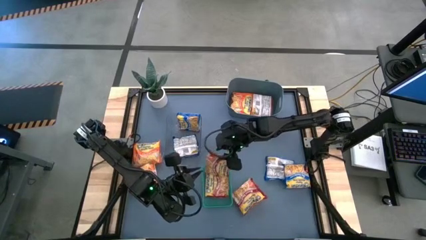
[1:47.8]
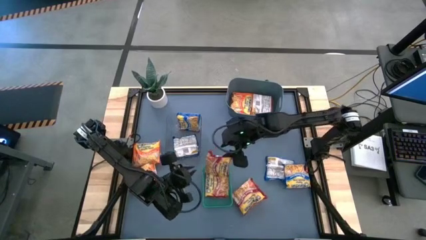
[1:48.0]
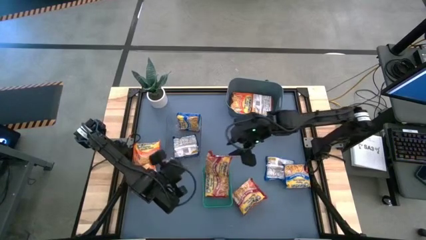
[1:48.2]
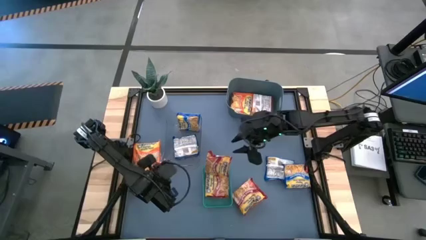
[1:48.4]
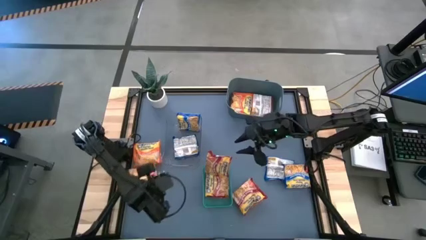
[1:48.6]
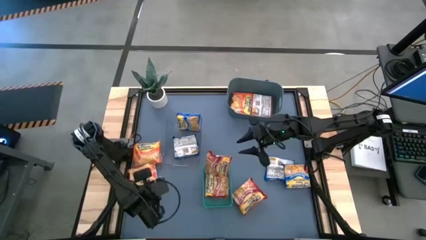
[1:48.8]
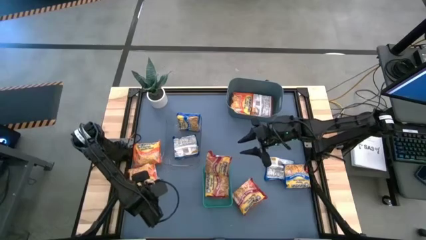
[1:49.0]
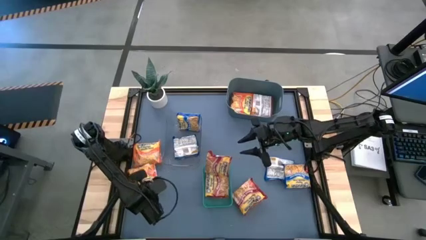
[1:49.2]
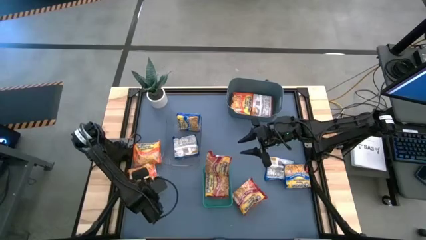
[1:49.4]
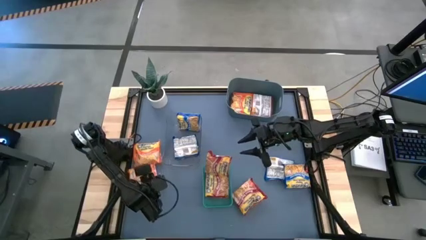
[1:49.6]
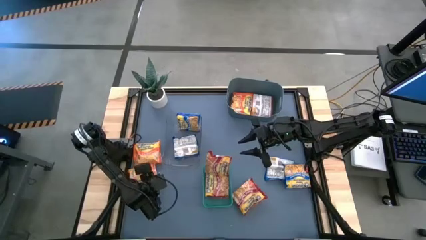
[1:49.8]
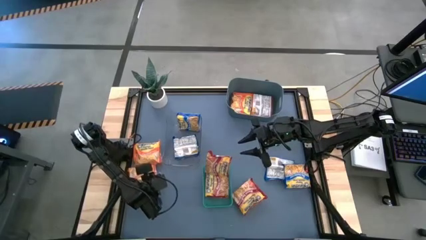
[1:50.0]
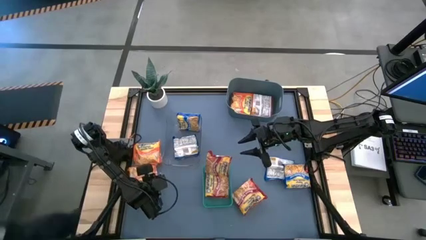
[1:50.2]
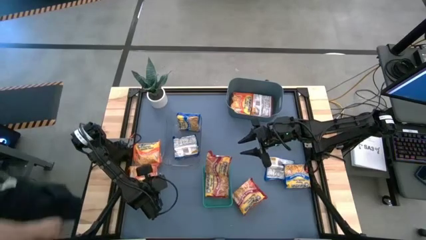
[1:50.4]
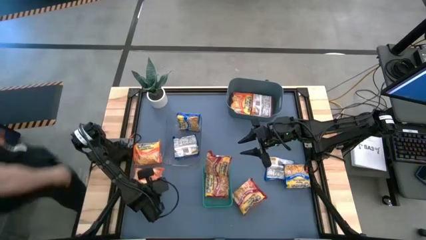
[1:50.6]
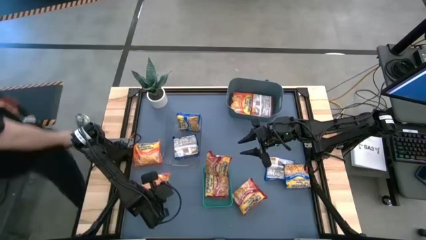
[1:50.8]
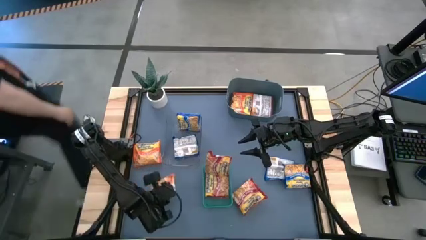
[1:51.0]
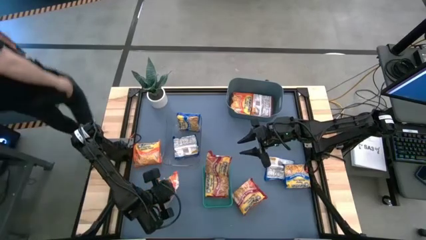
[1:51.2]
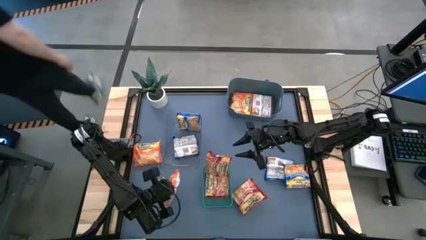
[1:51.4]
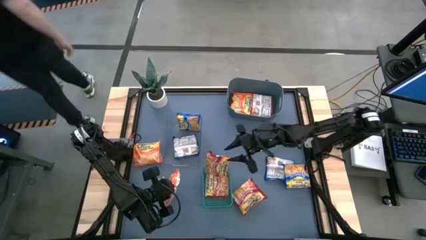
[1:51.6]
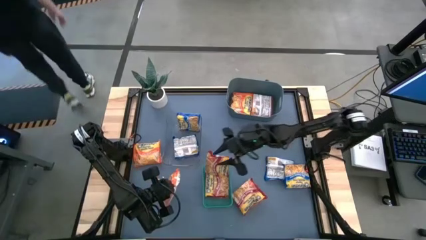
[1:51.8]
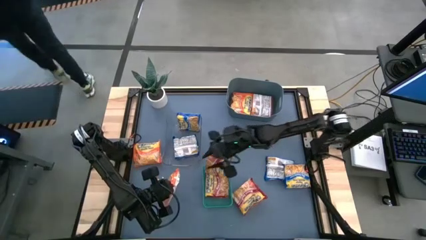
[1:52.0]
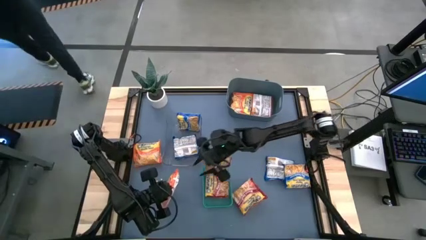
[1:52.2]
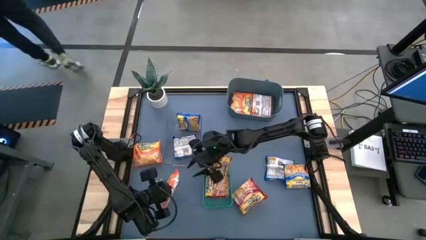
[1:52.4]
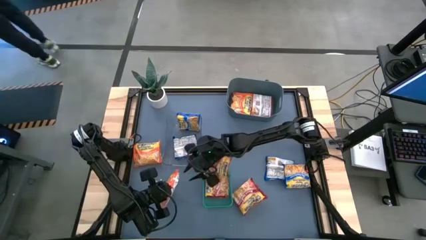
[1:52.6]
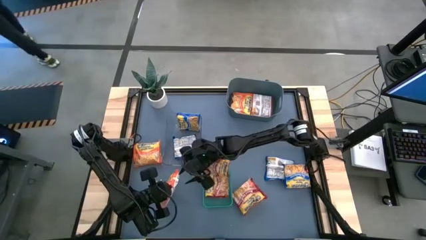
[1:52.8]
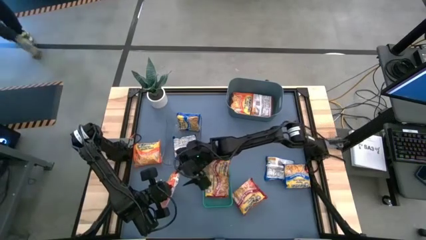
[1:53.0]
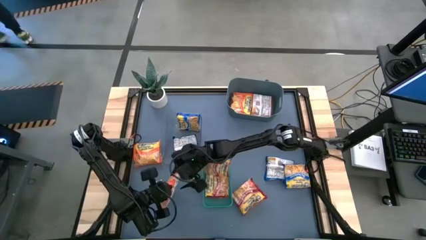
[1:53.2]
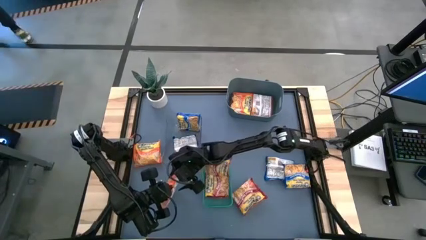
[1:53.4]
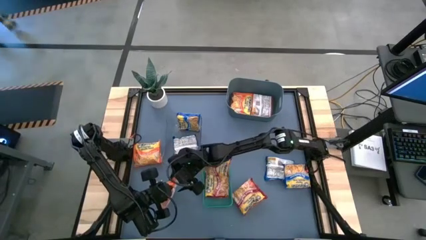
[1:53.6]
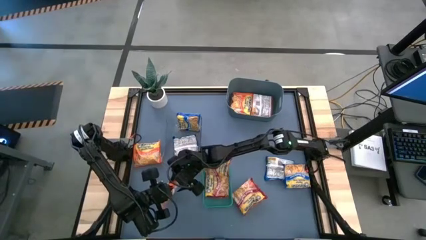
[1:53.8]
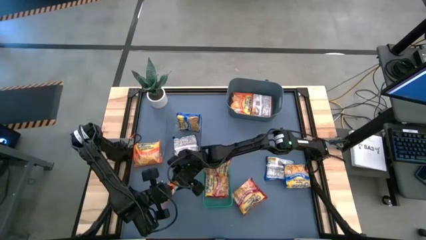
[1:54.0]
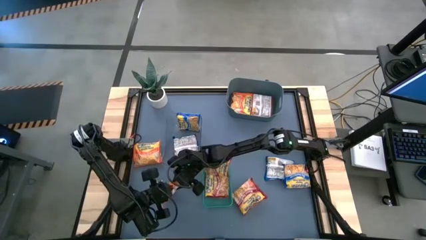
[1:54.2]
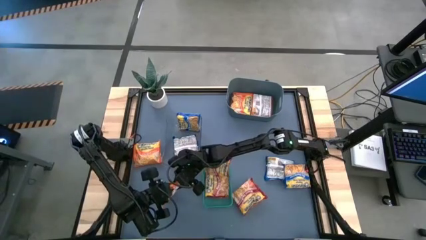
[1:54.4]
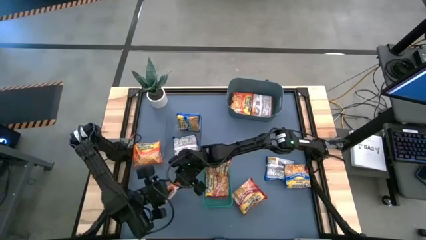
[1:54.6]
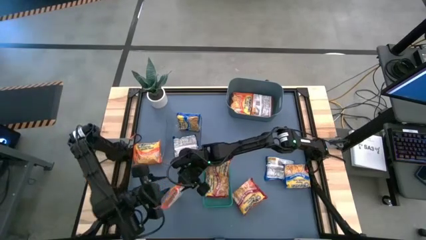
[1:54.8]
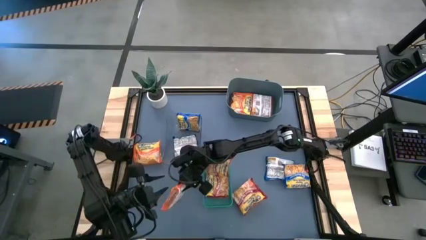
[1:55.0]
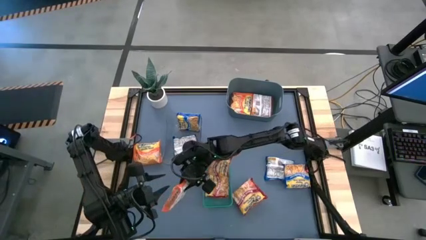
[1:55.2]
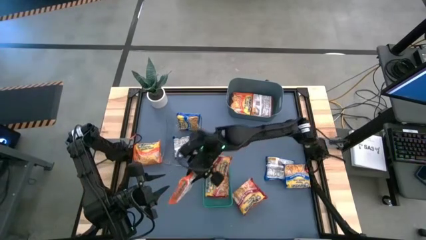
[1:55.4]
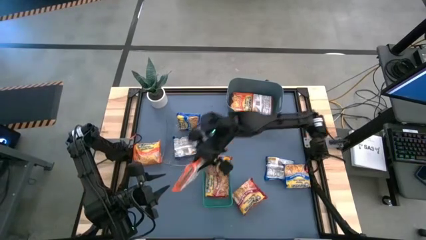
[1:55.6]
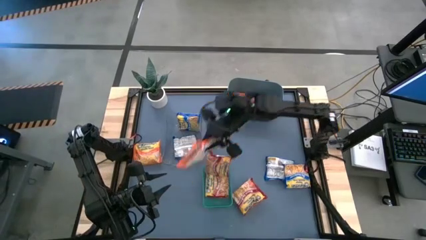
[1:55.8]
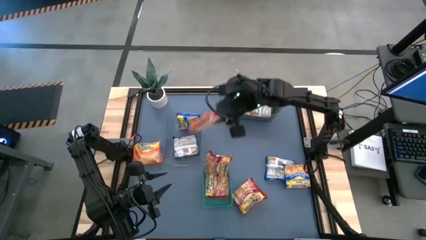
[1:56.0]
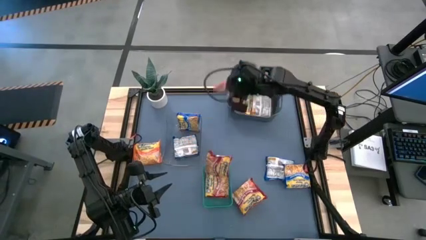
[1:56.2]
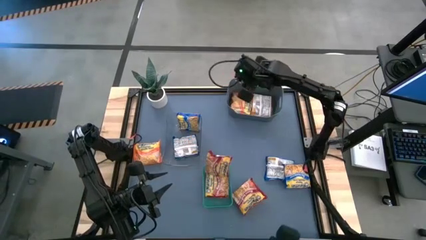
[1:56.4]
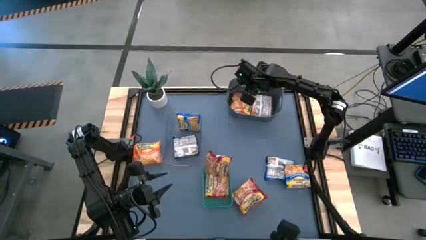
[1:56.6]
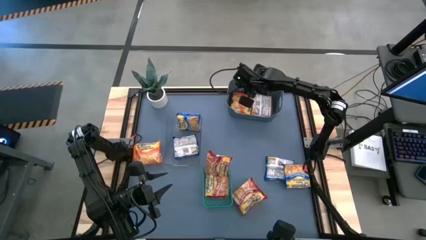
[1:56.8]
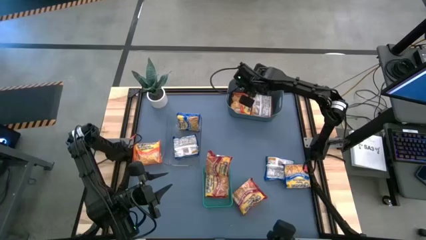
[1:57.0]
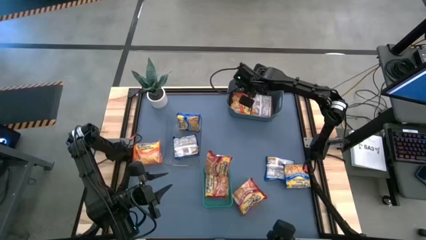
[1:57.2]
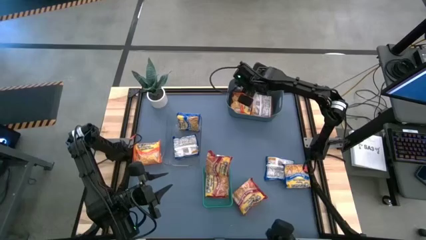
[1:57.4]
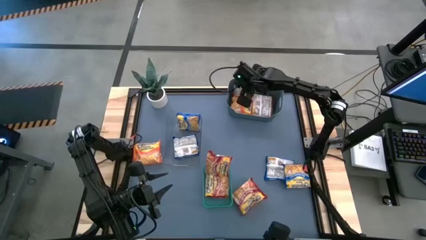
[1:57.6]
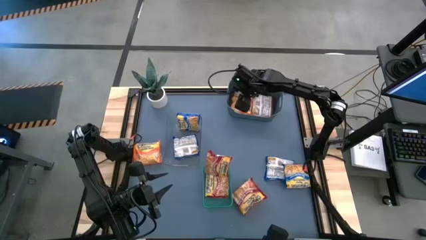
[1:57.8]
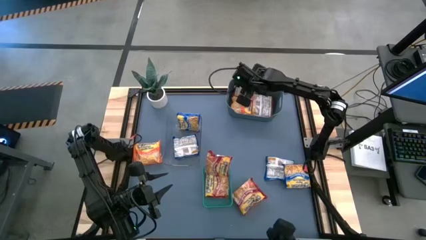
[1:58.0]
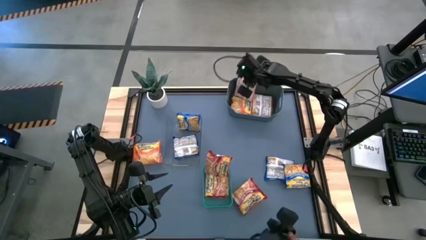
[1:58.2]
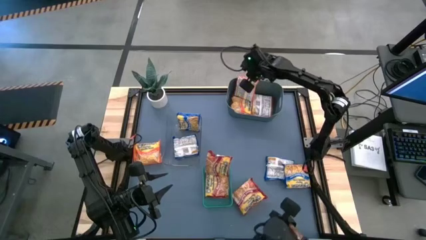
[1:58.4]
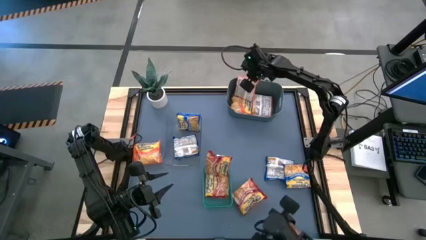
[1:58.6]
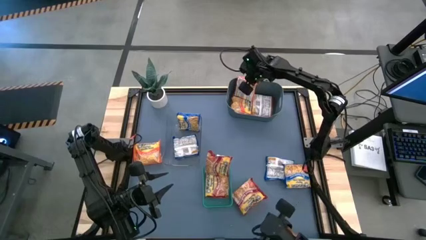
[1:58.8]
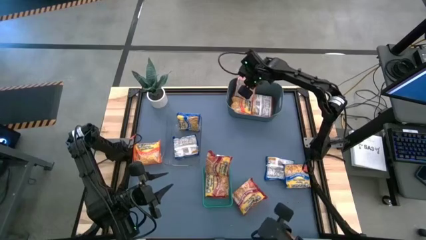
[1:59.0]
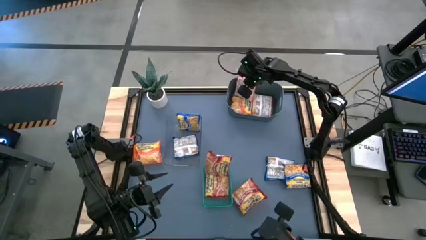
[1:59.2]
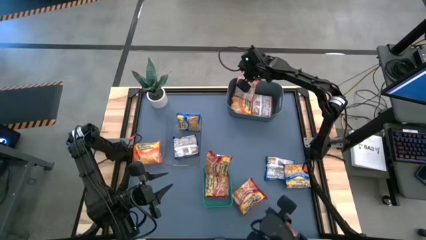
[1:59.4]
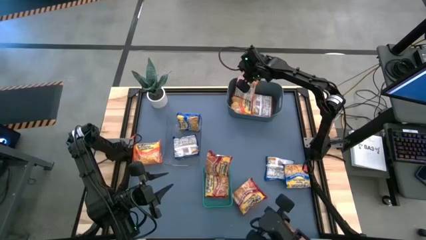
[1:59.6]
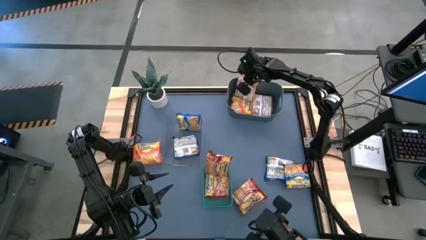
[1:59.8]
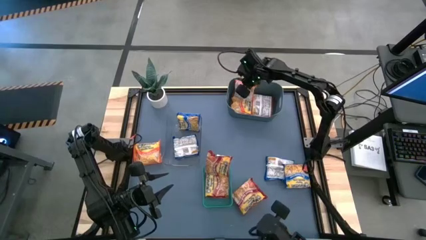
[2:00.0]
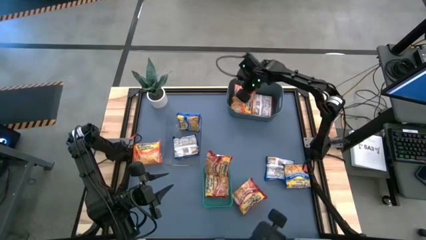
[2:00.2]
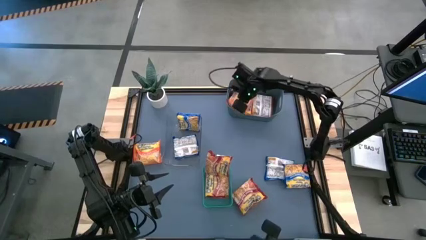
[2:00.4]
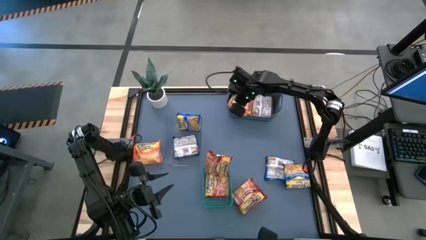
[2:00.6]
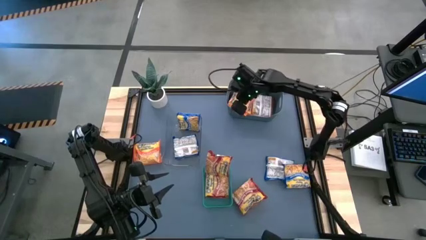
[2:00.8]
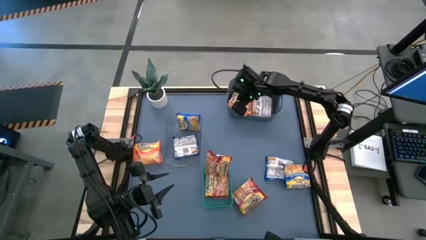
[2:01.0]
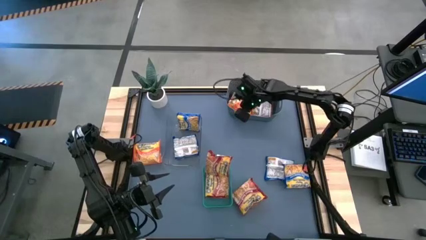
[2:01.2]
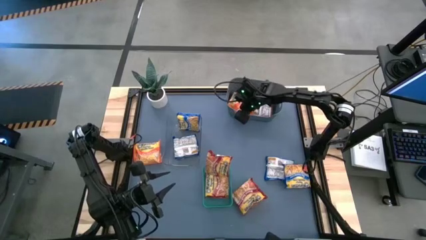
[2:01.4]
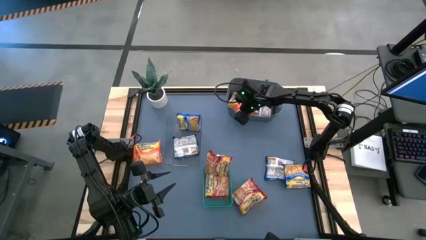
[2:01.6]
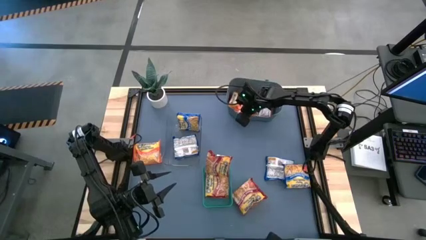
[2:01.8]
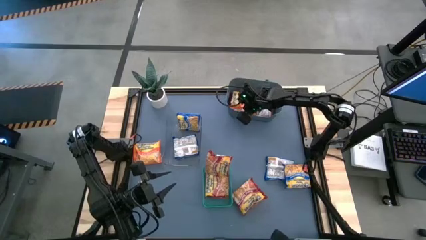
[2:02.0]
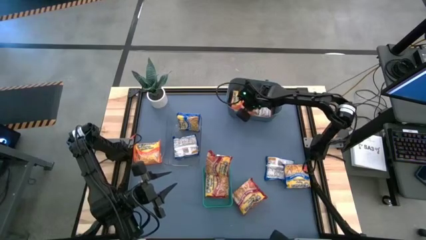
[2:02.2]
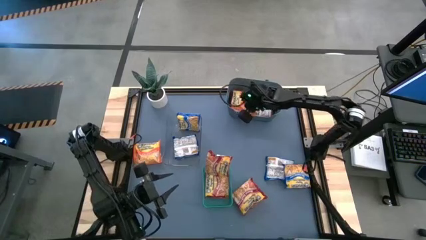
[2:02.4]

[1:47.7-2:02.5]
Task: Sort Maruchan noodles
Put the orange noodle pack into the dark blue bin

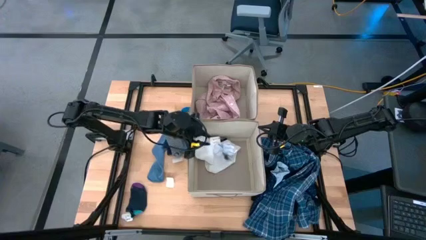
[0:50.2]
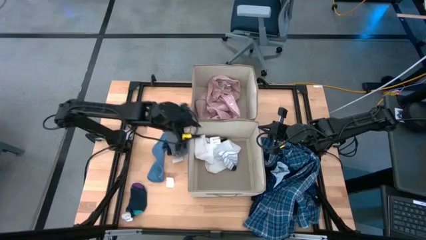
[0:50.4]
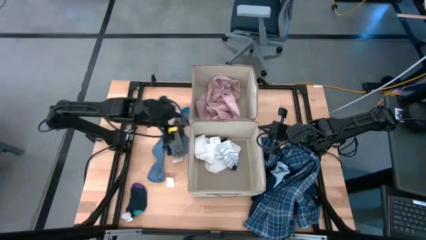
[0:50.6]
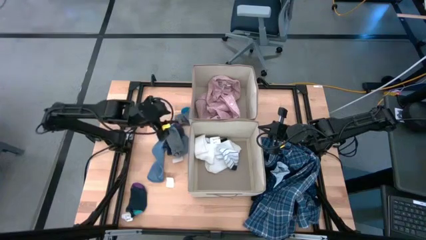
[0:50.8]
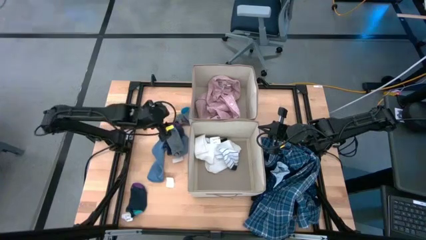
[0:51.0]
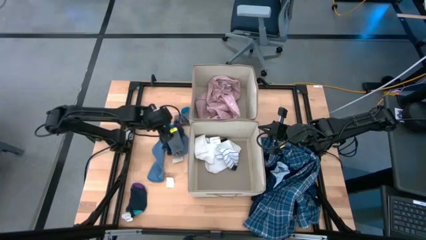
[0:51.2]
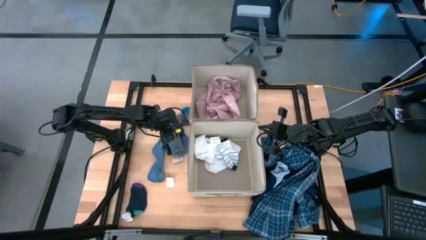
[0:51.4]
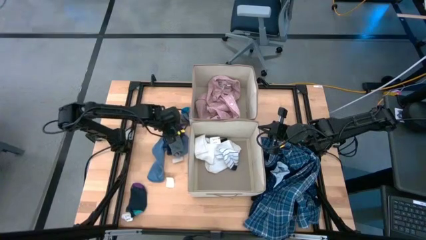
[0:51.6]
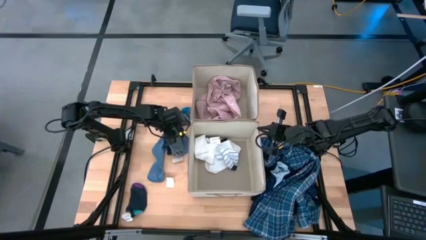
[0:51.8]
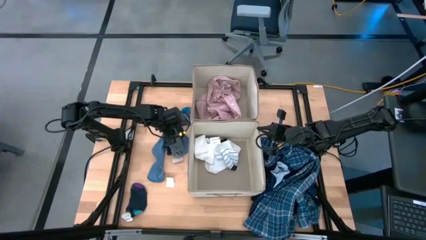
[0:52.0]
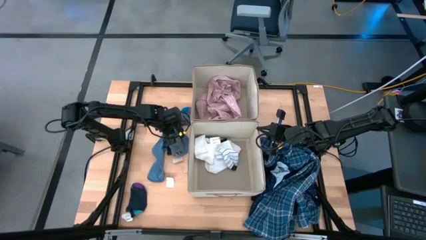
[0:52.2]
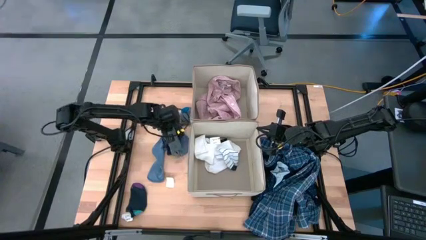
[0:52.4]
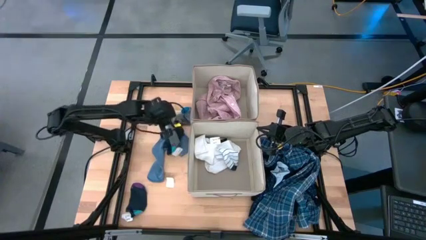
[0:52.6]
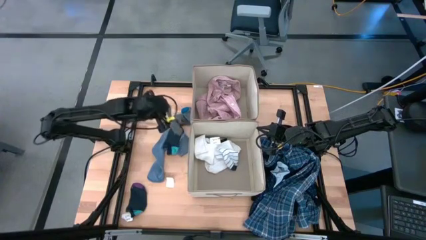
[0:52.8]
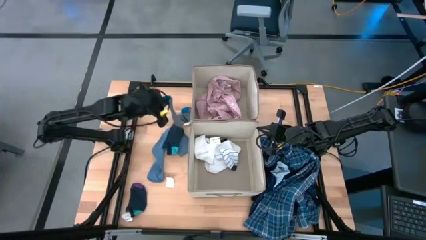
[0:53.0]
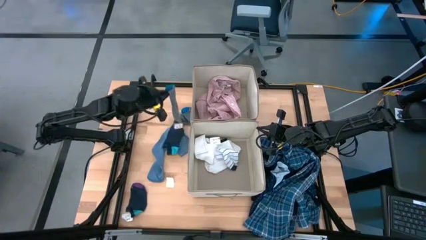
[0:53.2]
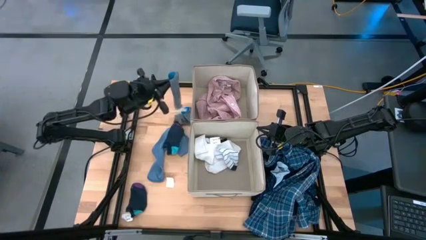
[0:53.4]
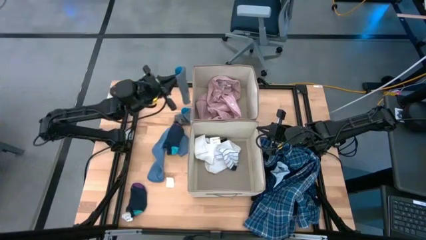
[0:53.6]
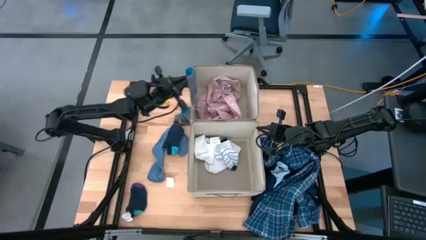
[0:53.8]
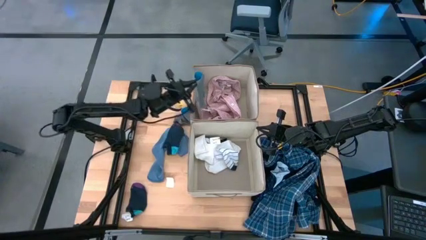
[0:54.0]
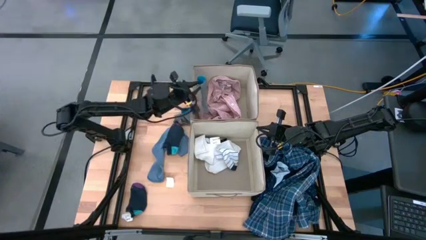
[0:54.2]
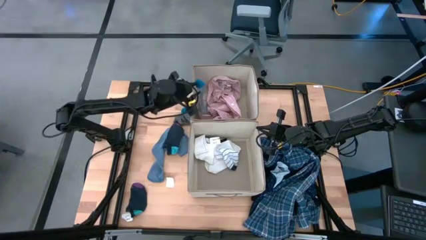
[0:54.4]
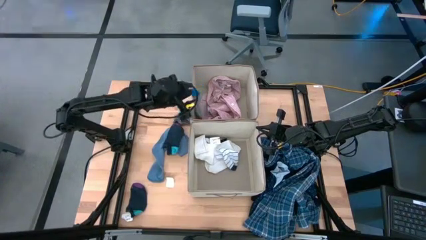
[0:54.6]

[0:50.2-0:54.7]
Task: Sort clothes
Put the gray sock into the top laundry organizer
